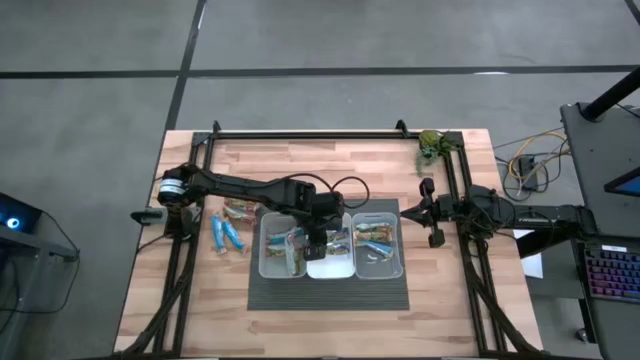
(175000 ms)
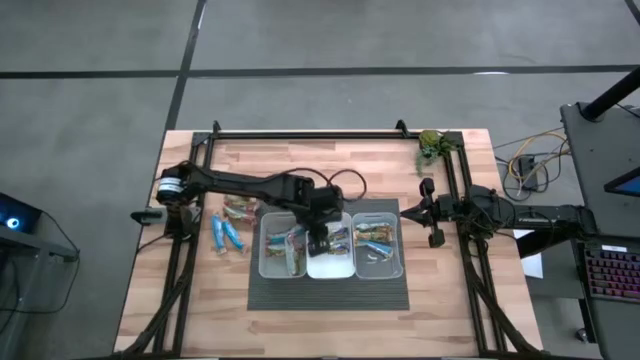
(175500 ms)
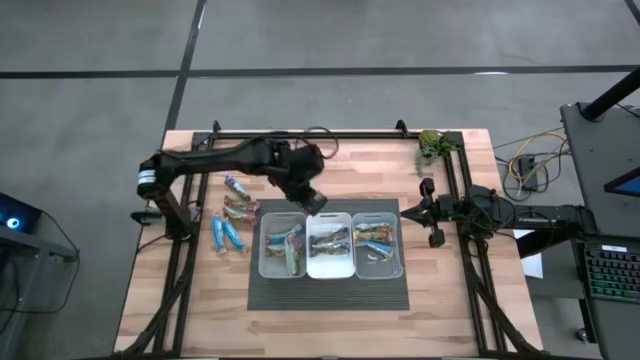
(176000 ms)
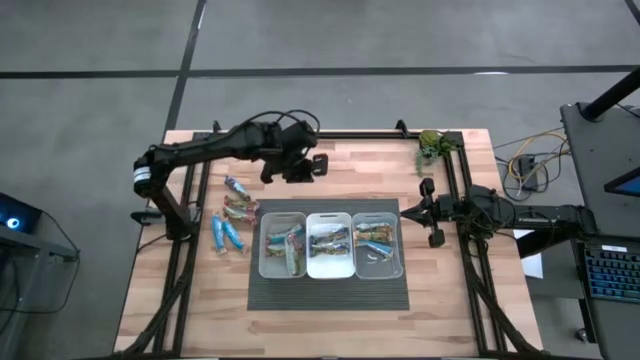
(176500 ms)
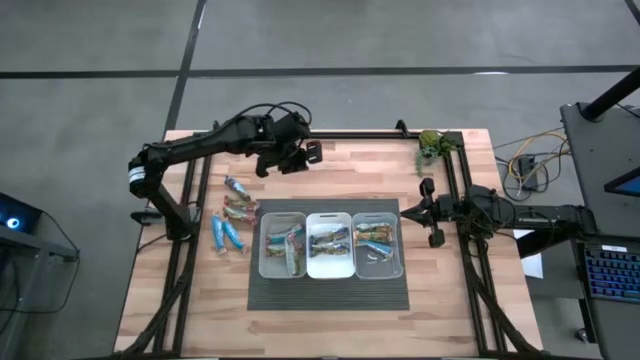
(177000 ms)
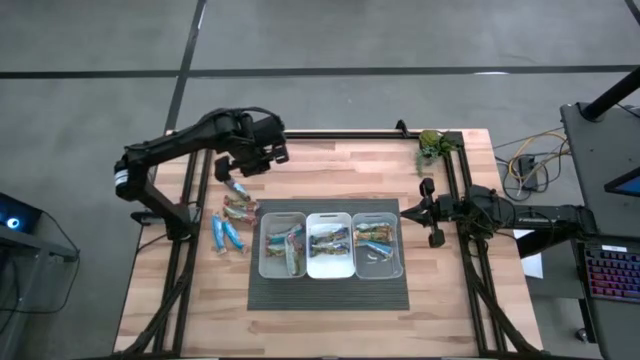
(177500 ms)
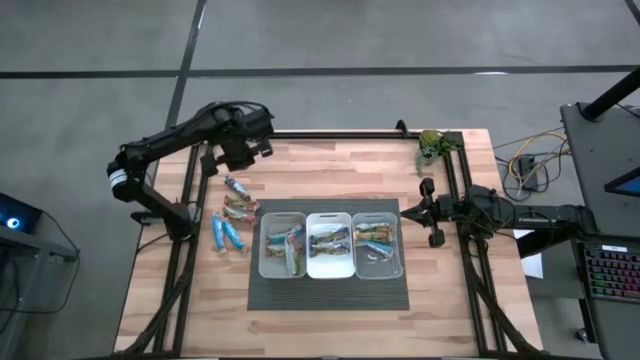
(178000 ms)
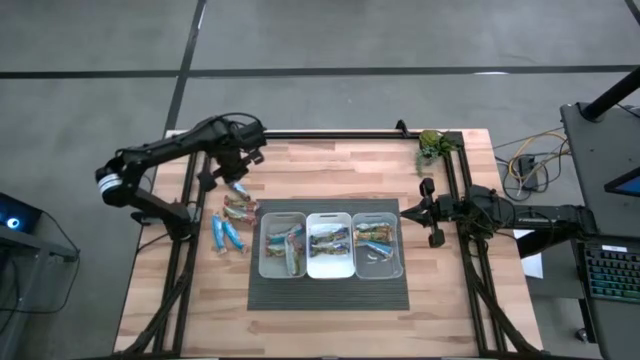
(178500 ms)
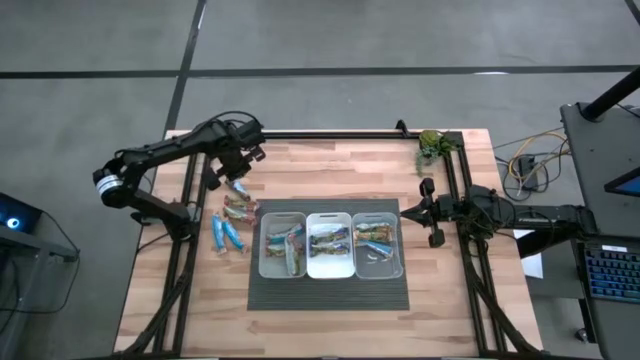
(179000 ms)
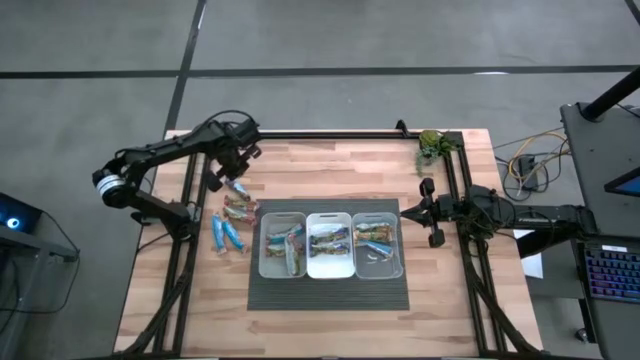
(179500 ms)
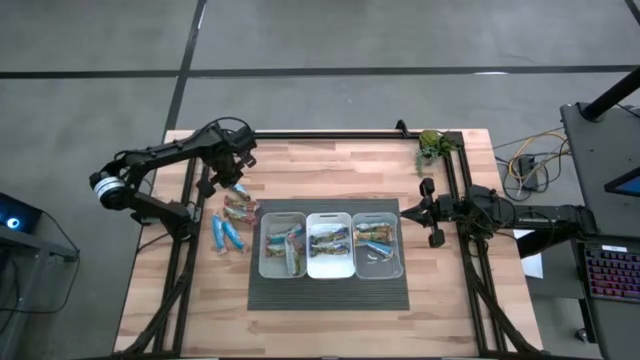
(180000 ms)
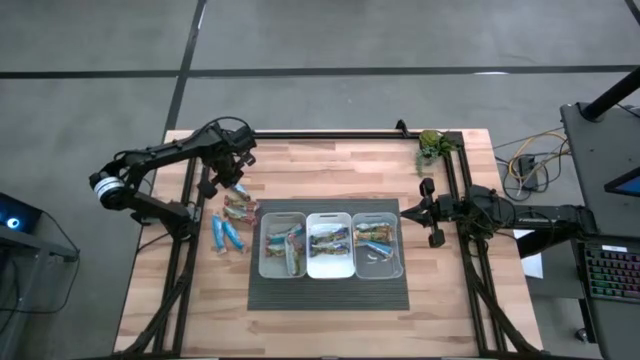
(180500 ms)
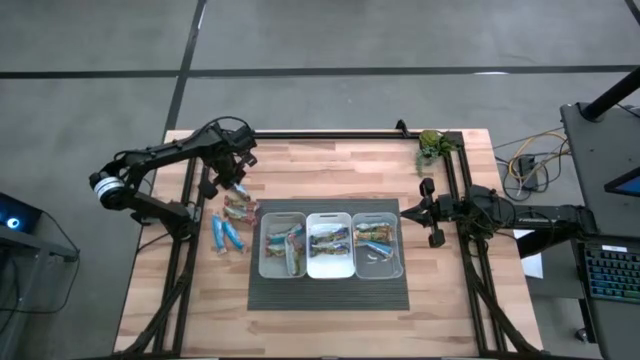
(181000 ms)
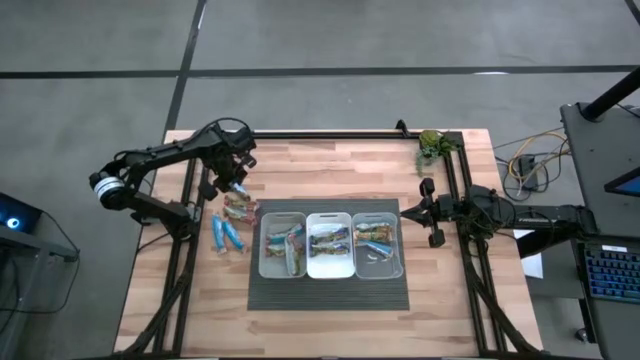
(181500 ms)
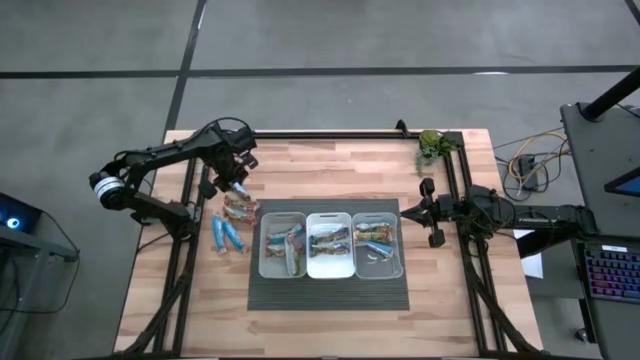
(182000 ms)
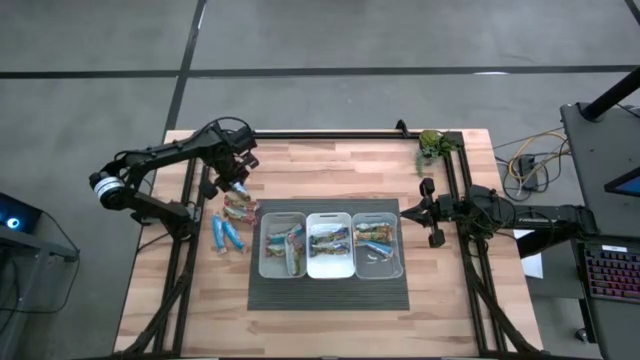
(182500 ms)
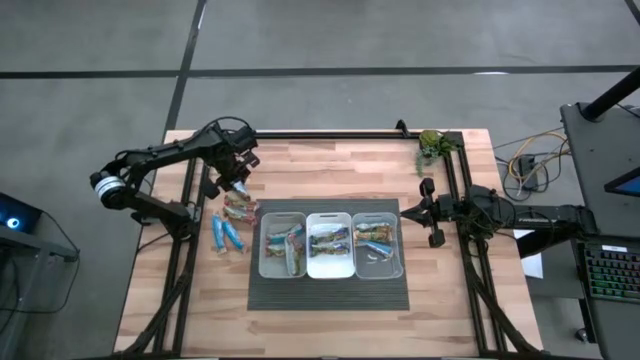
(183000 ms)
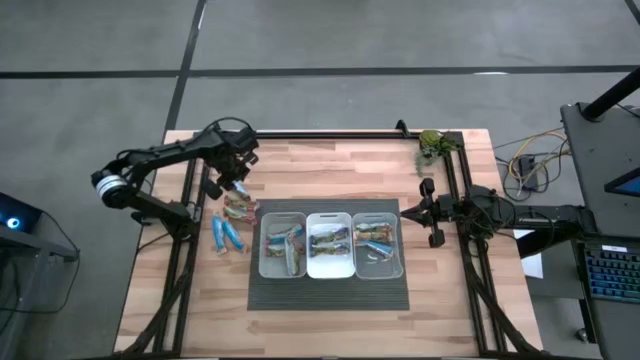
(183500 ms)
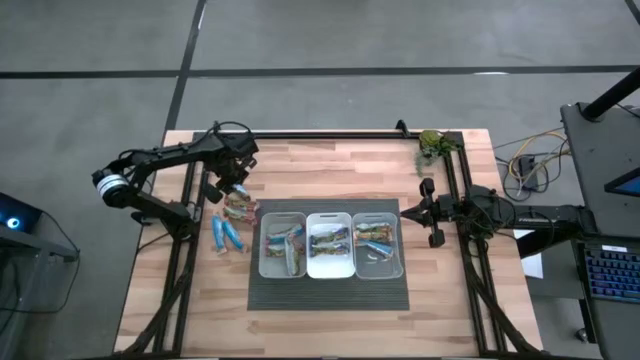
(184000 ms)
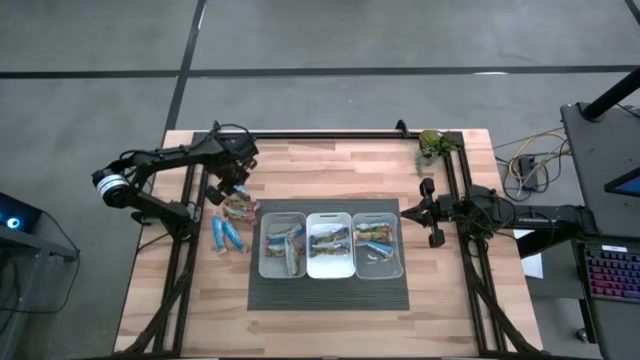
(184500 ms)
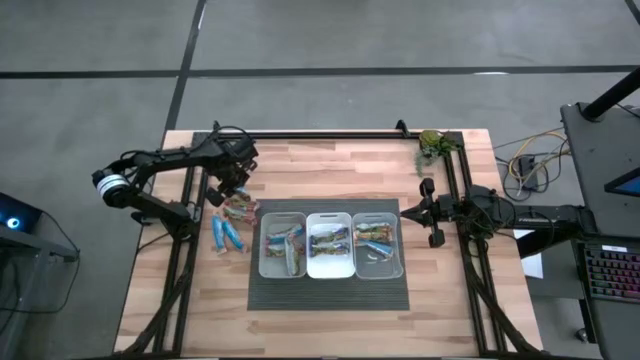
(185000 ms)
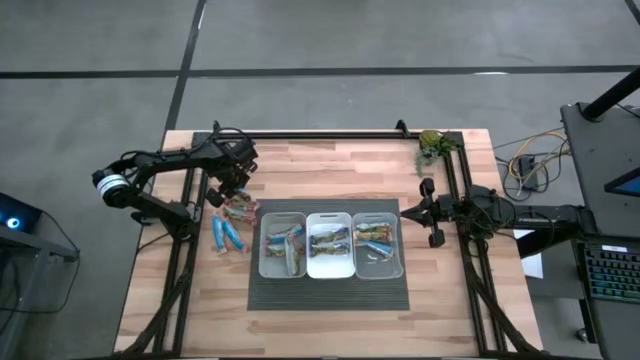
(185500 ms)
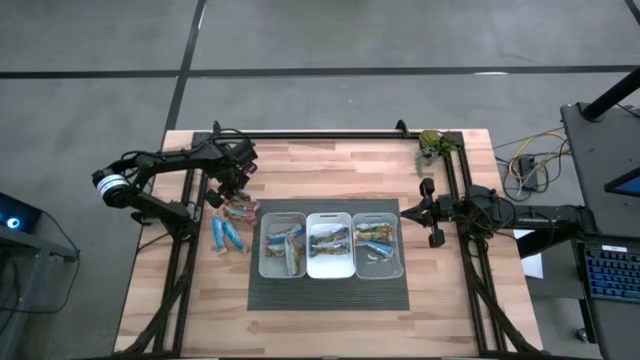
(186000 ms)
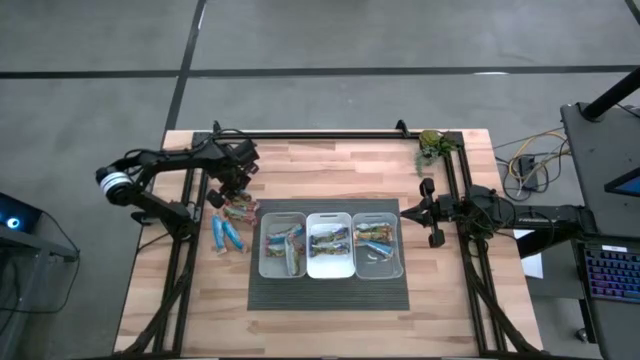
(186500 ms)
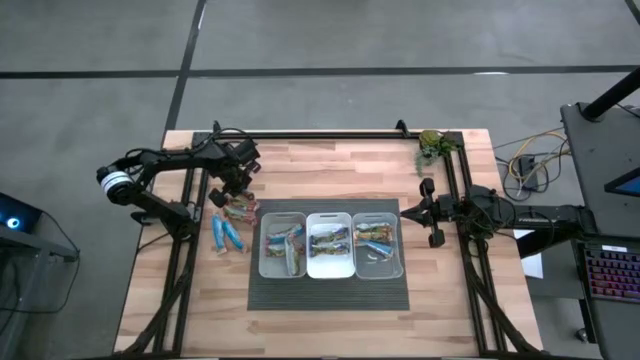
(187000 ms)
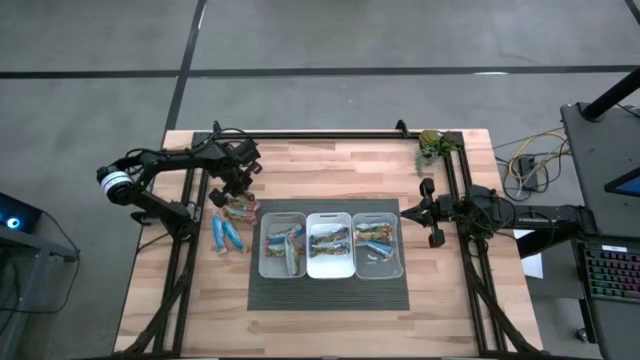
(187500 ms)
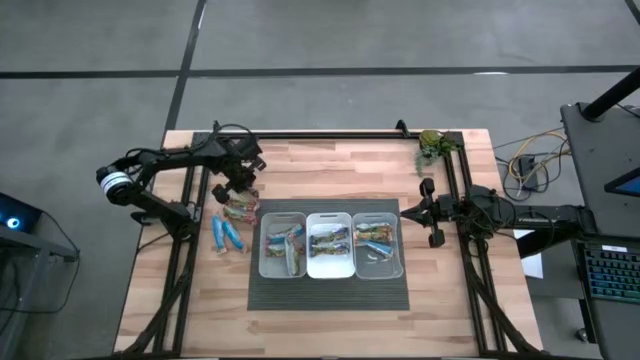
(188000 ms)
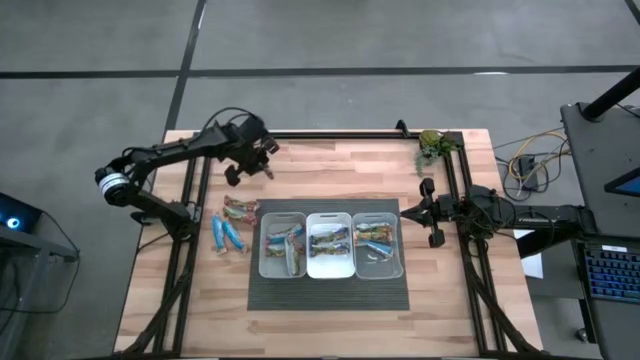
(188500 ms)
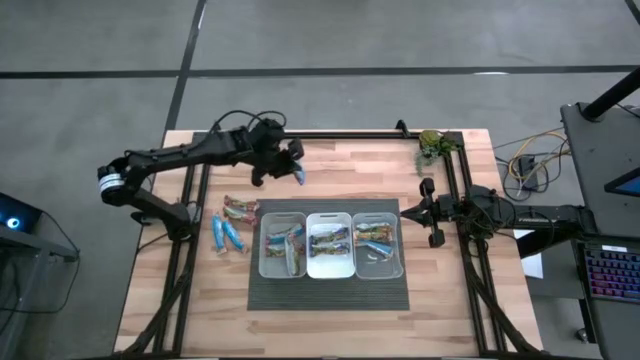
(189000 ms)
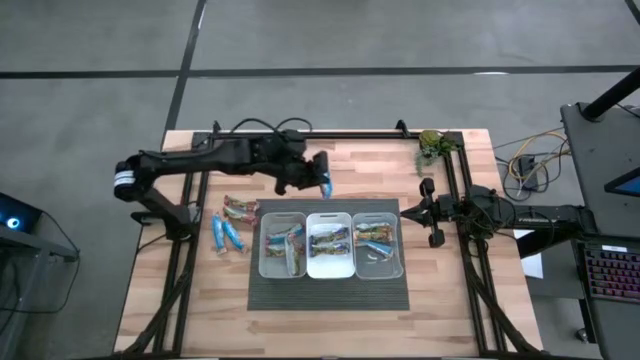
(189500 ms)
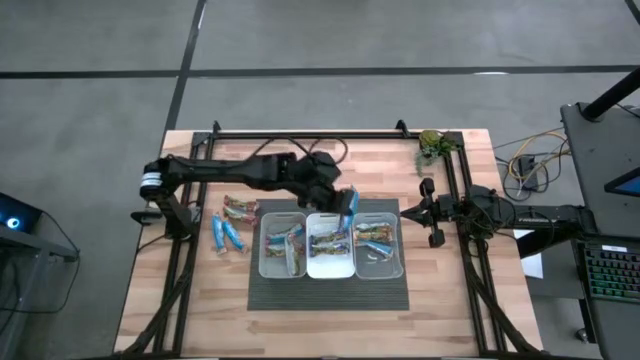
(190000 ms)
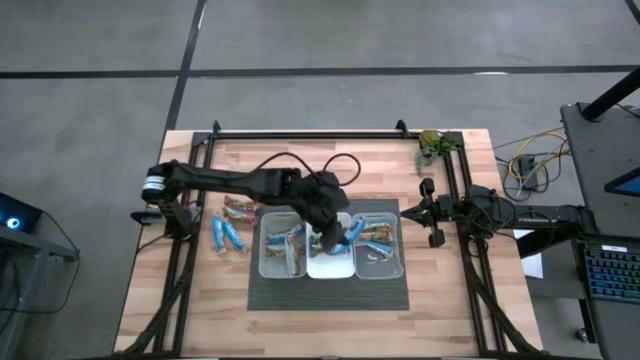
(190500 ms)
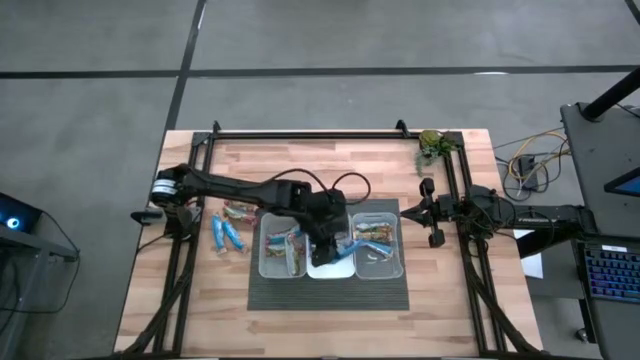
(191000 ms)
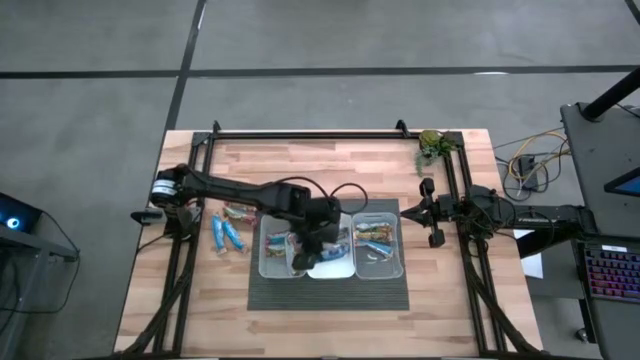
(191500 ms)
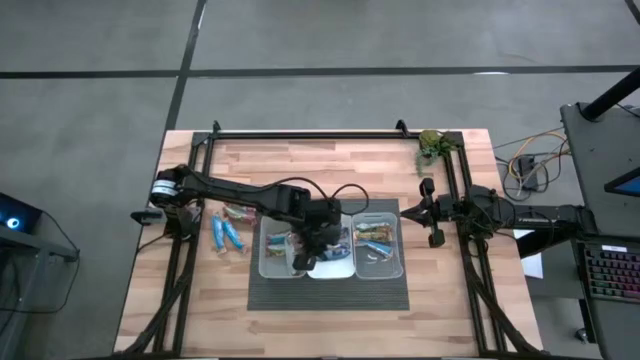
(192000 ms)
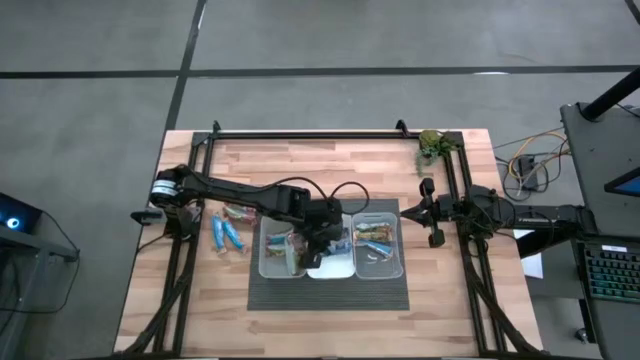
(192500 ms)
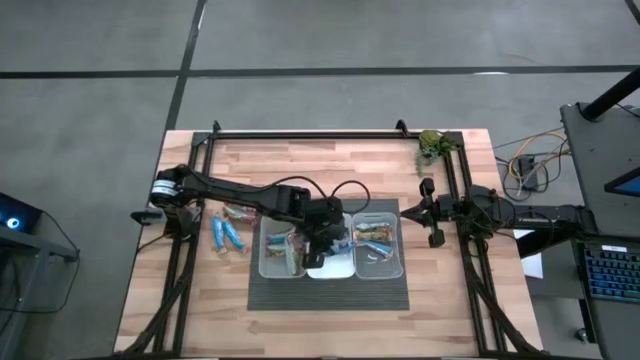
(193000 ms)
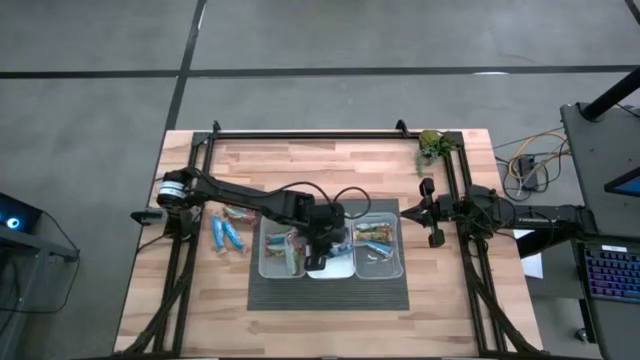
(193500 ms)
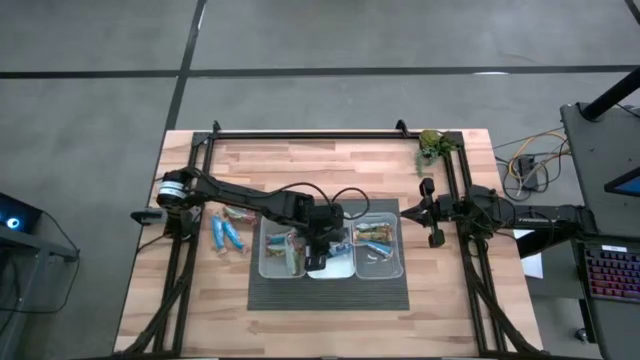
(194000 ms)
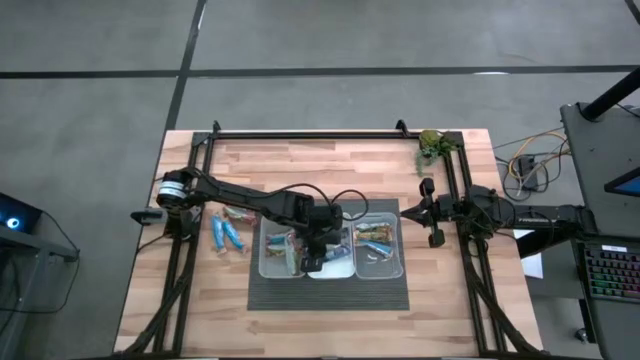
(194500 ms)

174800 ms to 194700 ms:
Task: Pick and place Granola Bars by type
Put the blue granola bar into the white bin

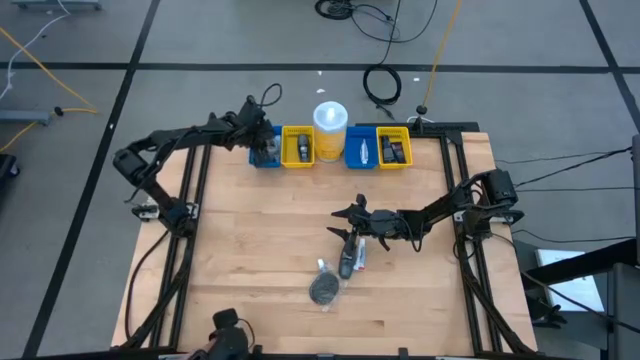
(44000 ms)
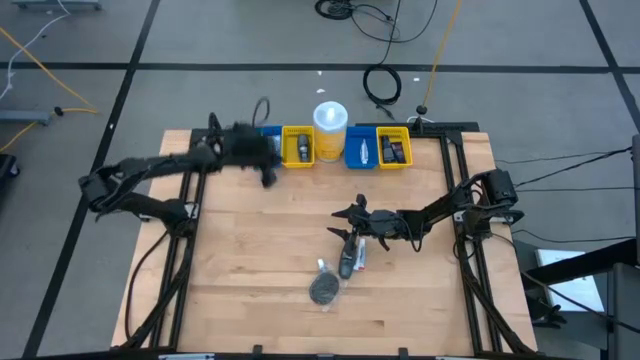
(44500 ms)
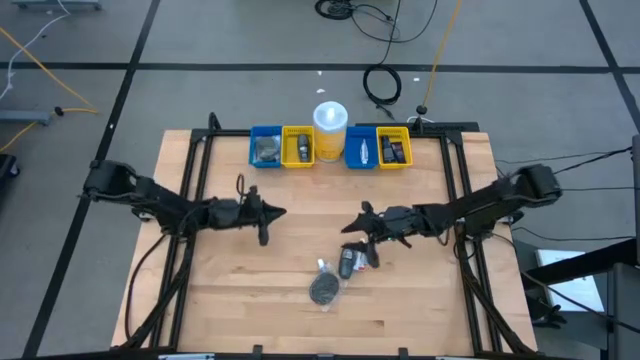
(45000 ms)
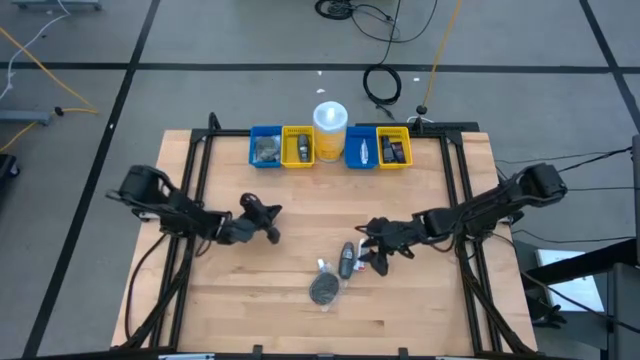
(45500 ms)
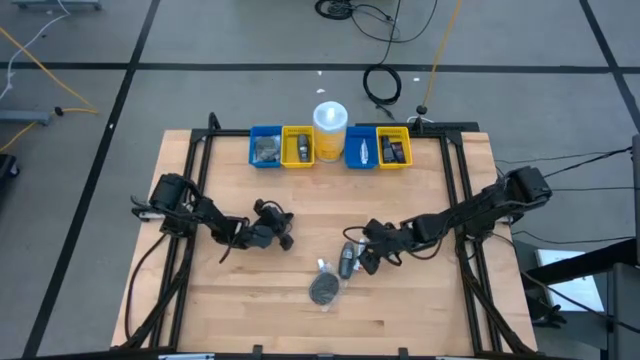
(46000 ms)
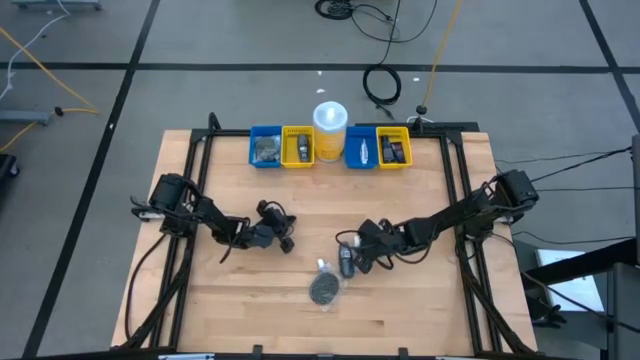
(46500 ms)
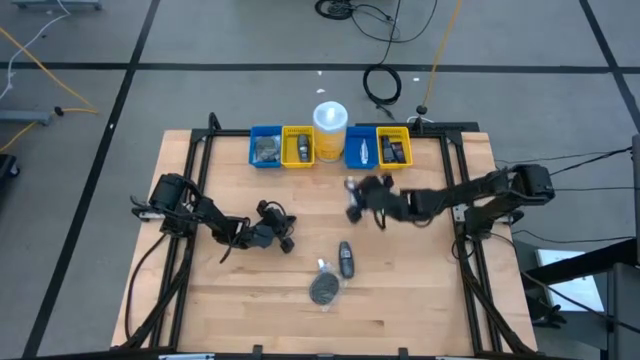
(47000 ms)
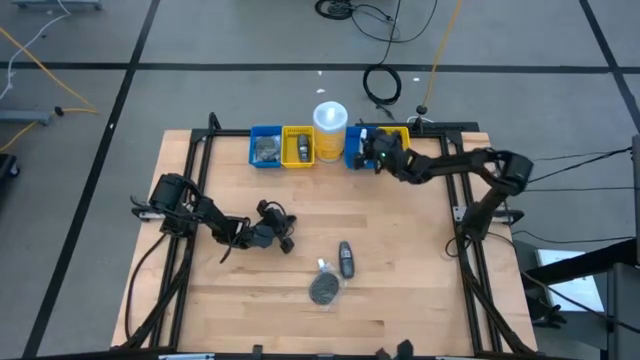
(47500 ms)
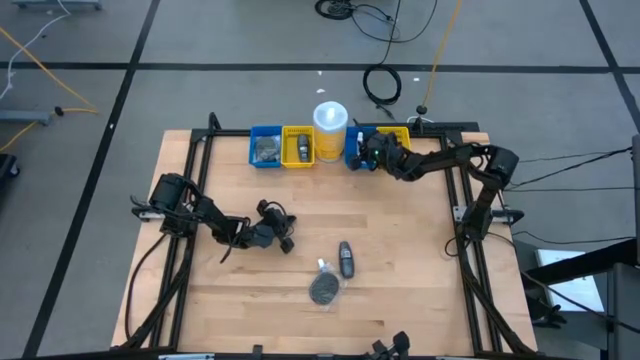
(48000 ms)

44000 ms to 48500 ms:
Task: Pick & Place Travel size toiletries
Put the white toothpaste into the right blue bin
